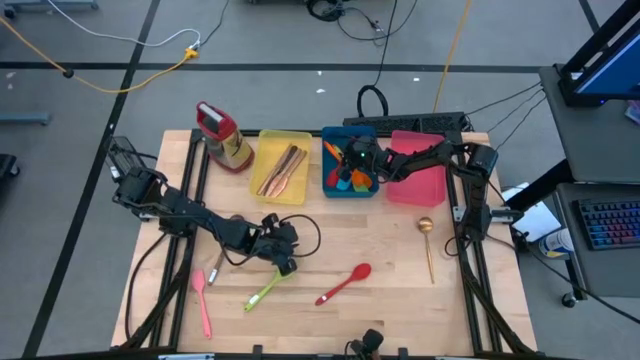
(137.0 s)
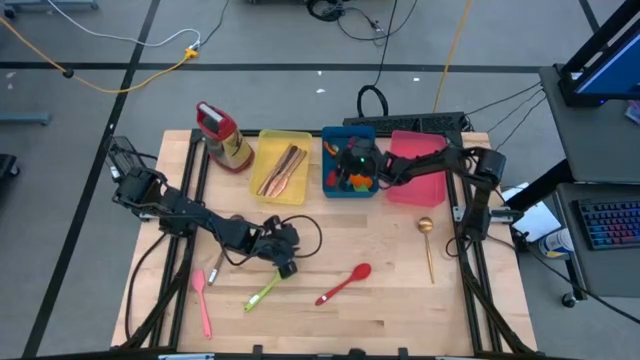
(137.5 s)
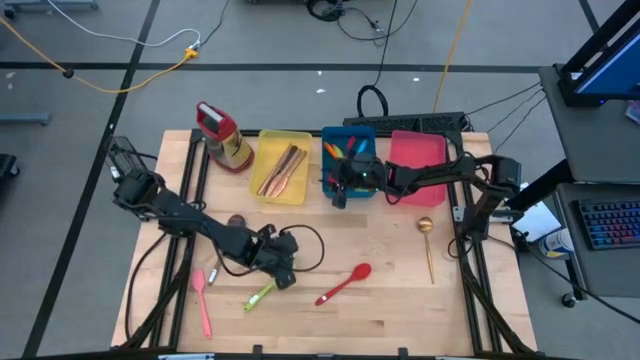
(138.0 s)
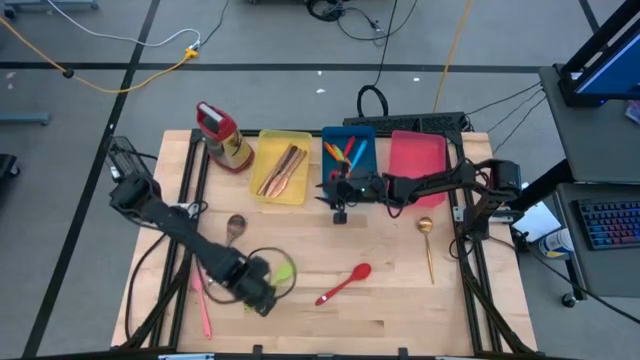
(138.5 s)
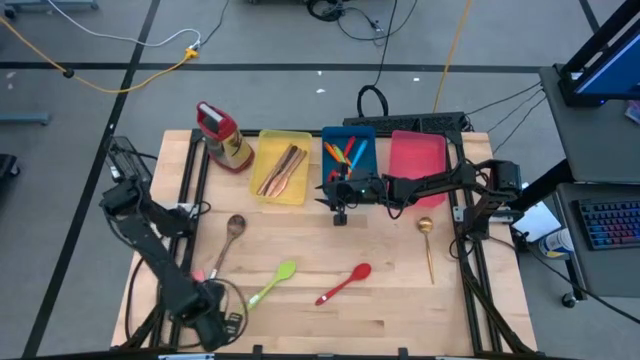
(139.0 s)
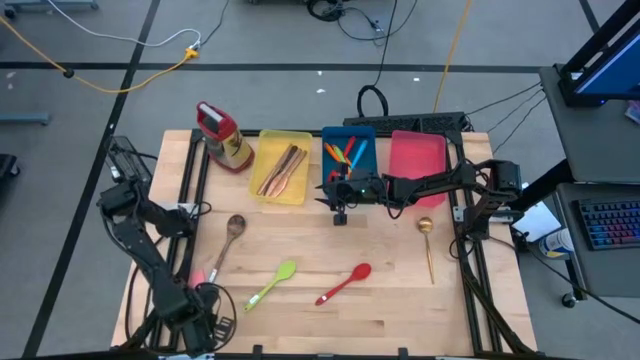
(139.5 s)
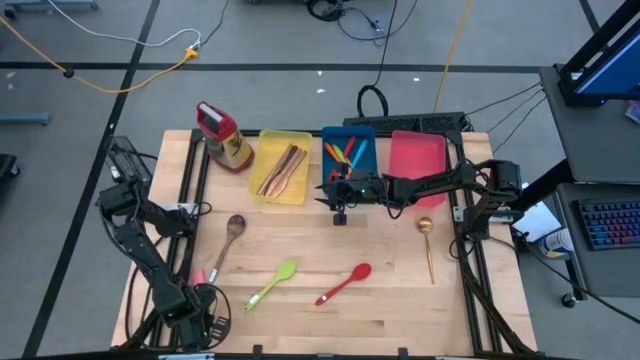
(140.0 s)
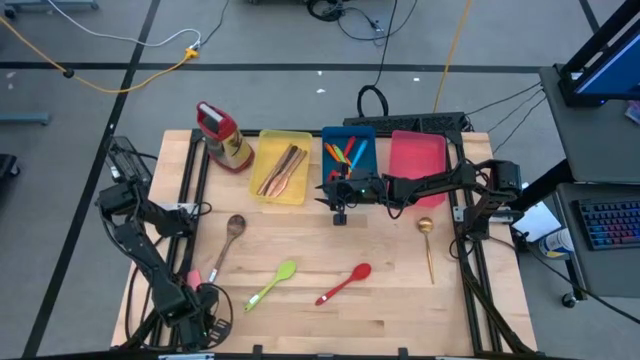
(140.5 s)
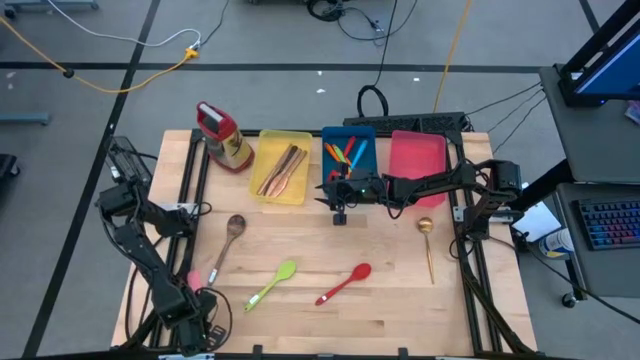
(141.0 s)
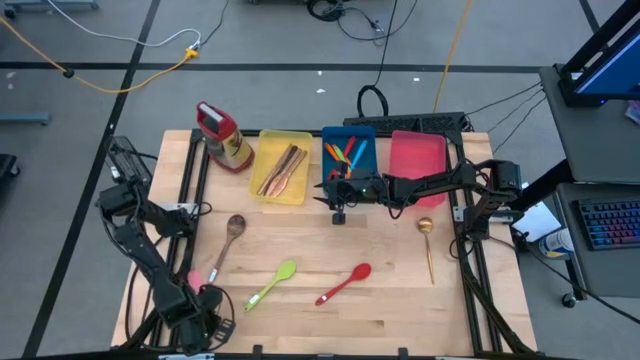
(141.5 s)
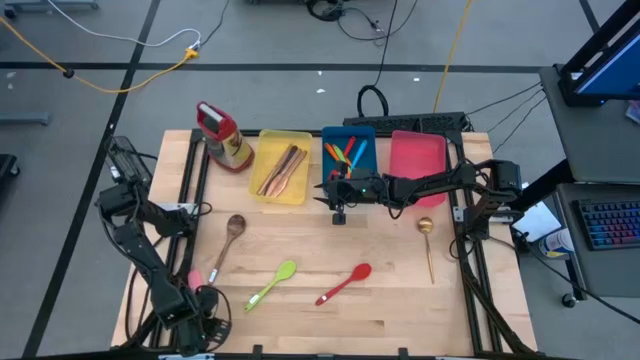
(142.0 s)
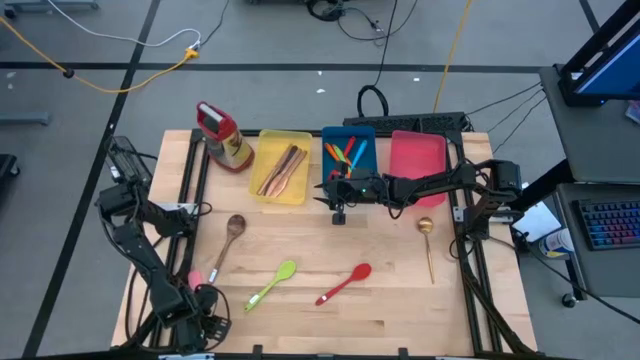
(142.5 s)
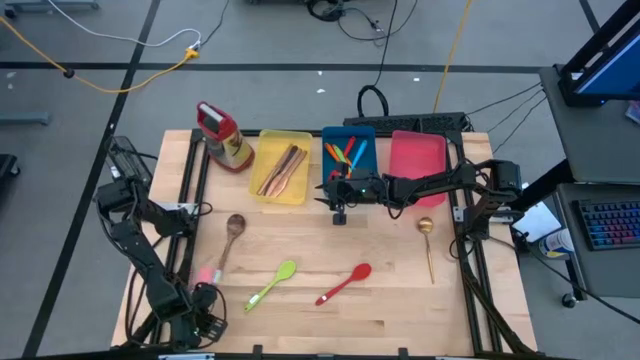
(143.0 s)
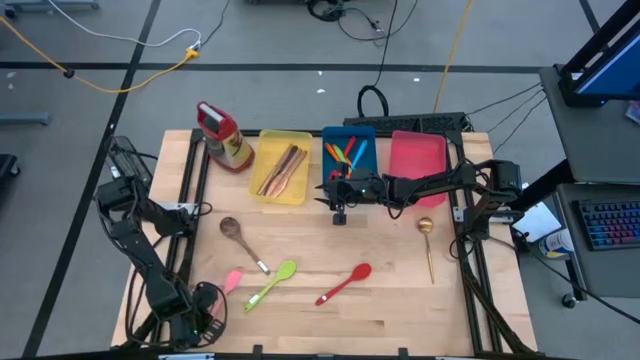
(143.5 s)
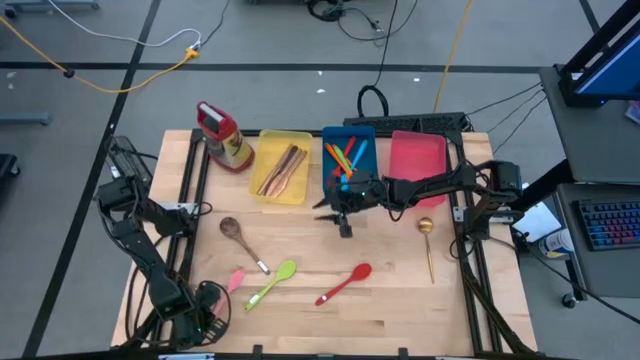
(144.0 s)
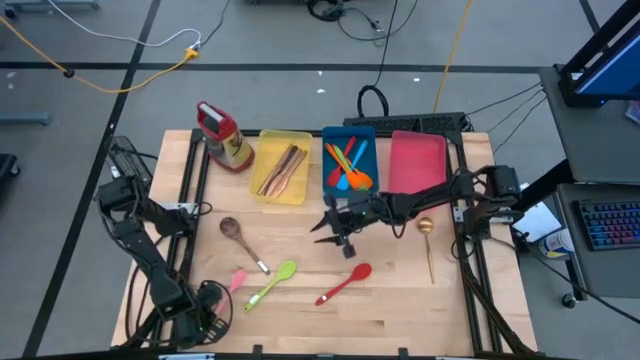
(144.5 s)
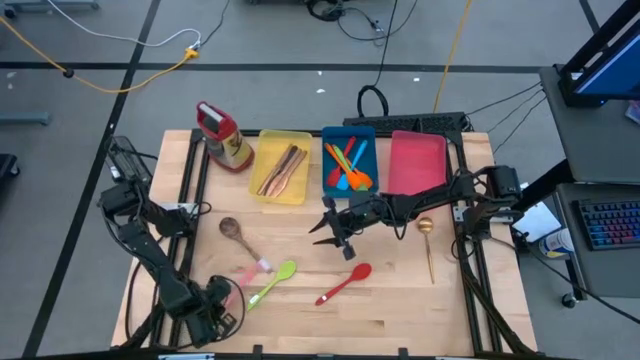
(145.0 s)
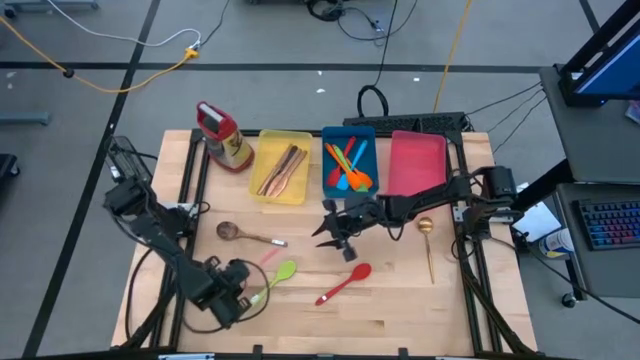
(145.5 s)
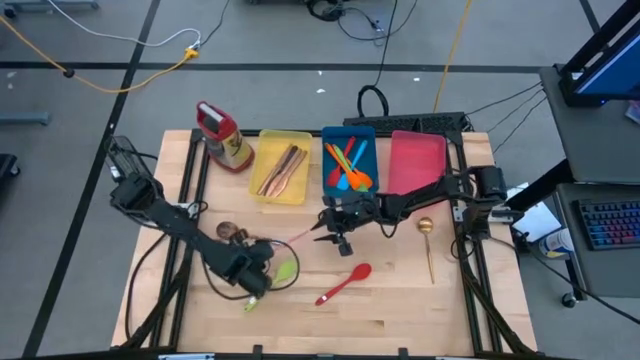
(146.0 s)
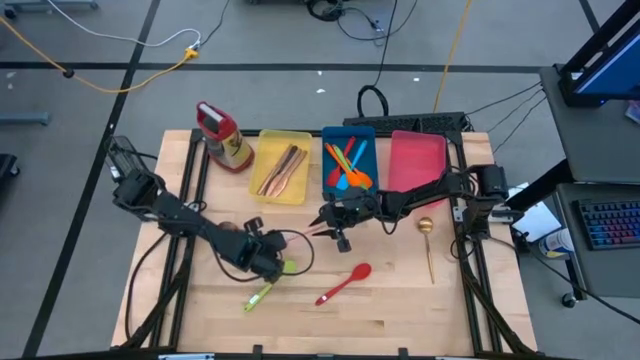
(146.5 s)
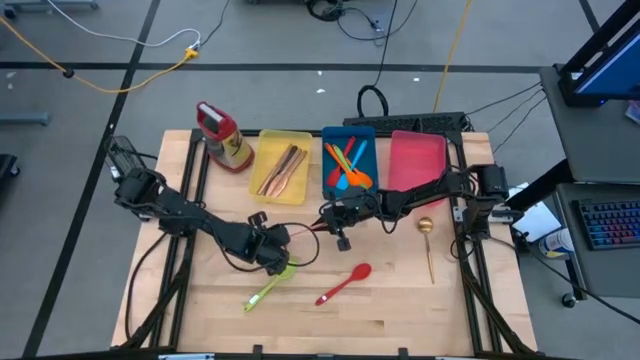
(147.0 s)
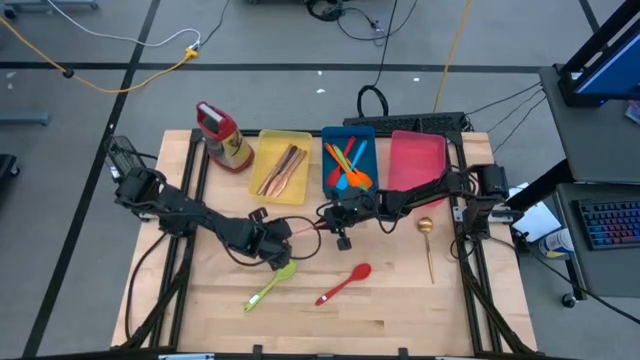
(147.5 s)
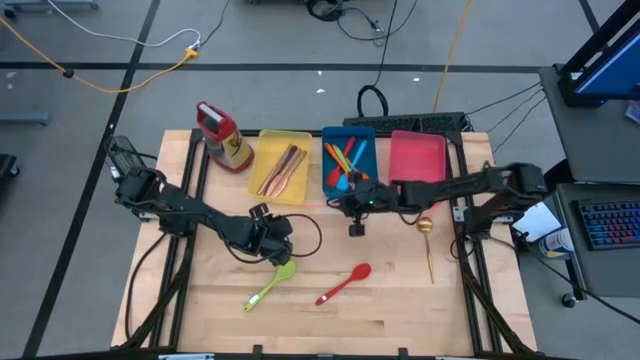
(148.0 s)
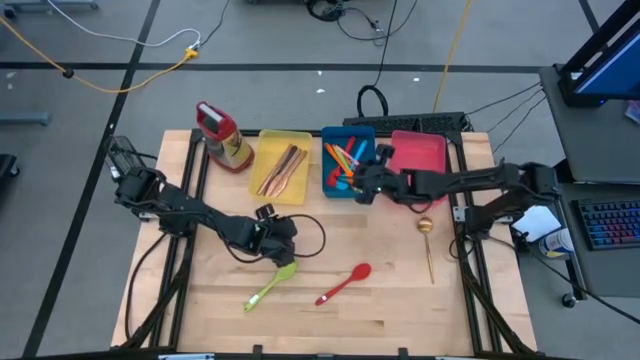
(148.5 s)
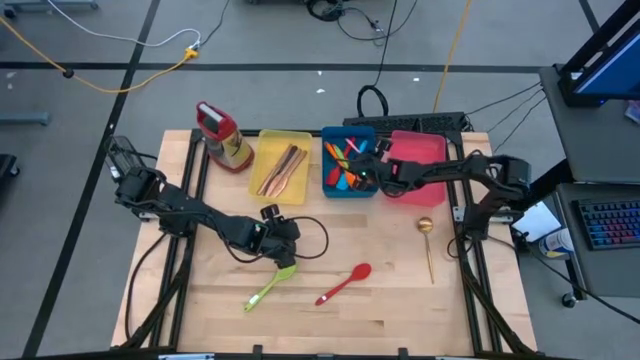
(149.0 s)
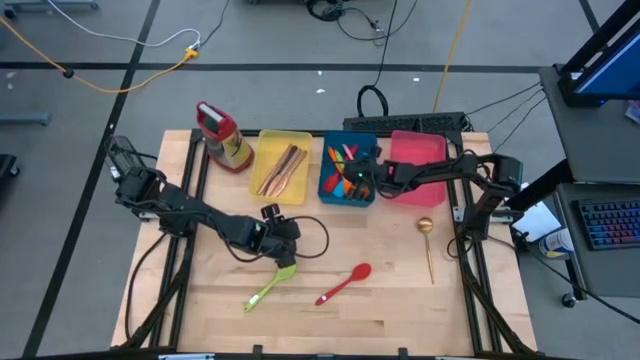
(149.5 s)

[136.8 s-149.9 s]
Task: Pick & Place Kitchen Items
Put the pink spatula into the blue bin

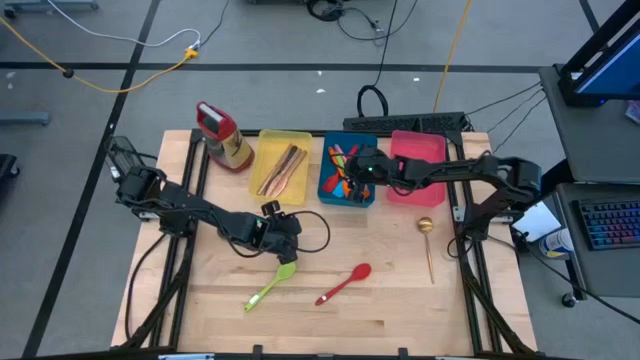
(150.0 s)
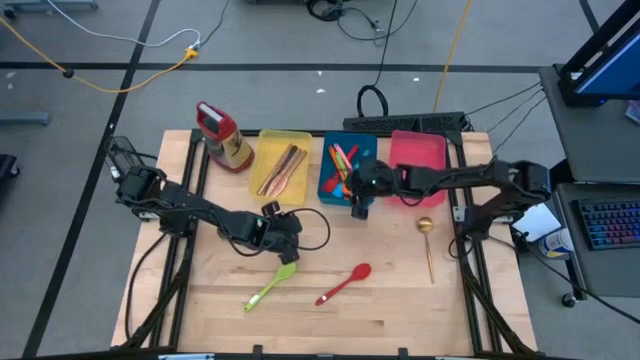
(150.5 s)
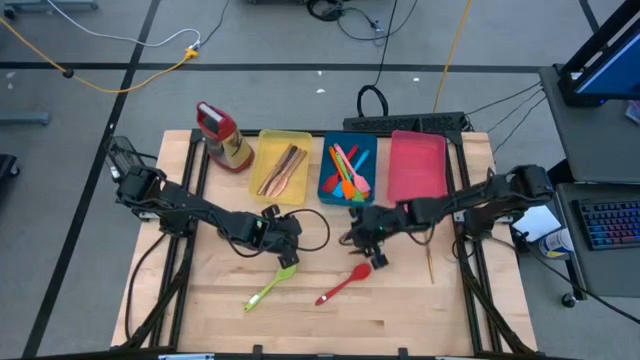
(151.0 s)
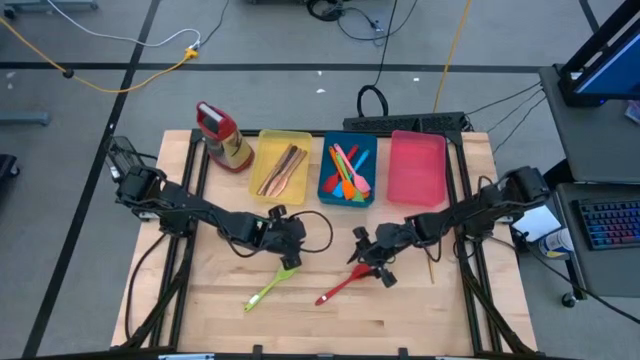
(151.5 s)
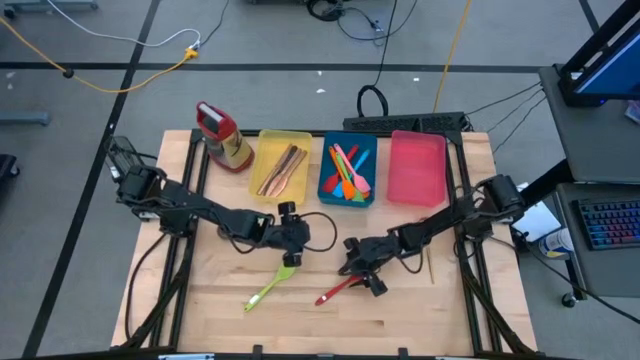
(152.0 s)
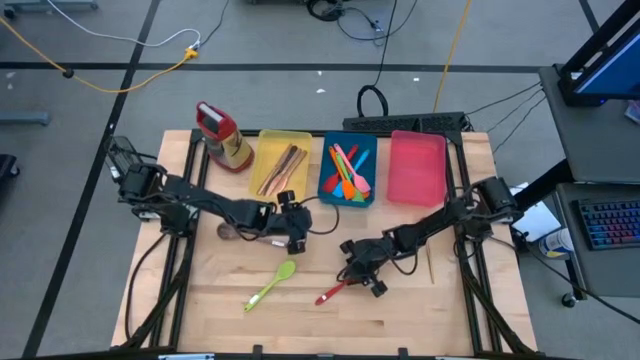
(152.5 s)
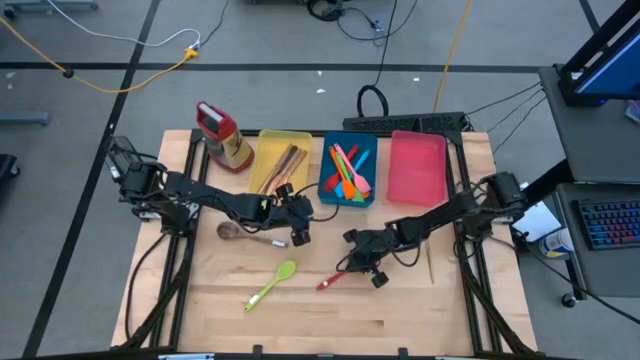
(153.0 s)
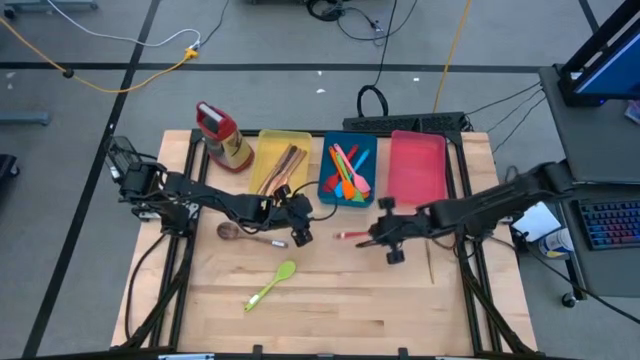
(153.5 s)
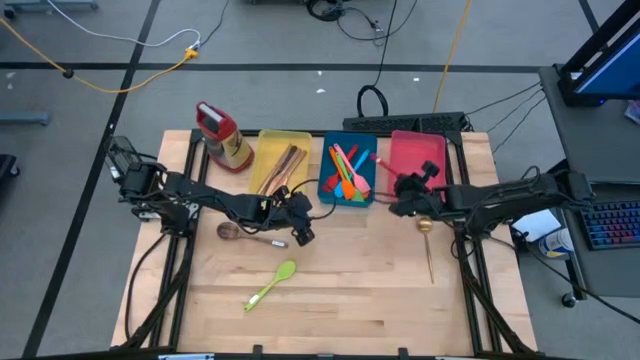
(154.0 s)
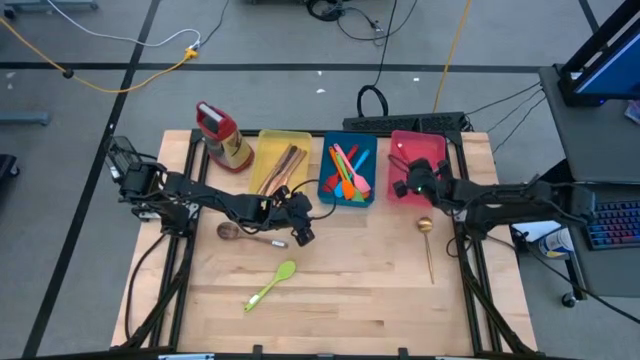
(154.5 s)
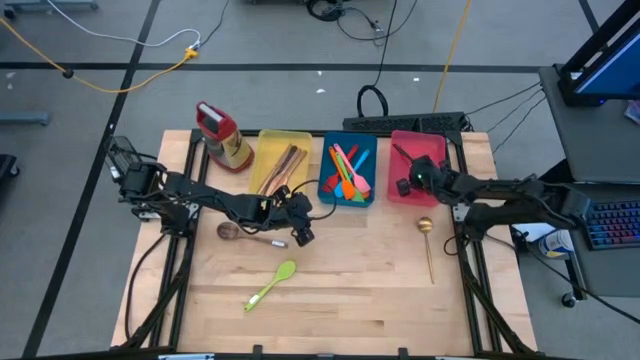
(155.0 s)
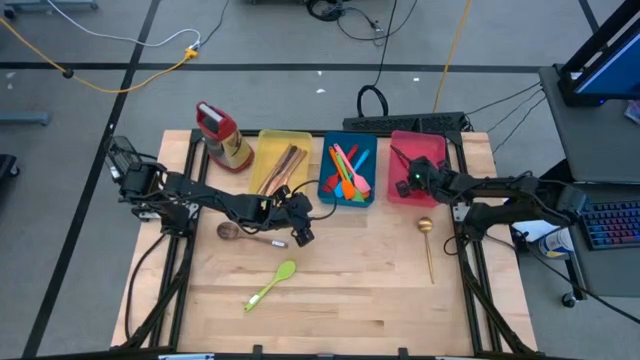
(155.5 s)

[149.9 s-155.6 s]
Put the red serving spoon into the pink bin

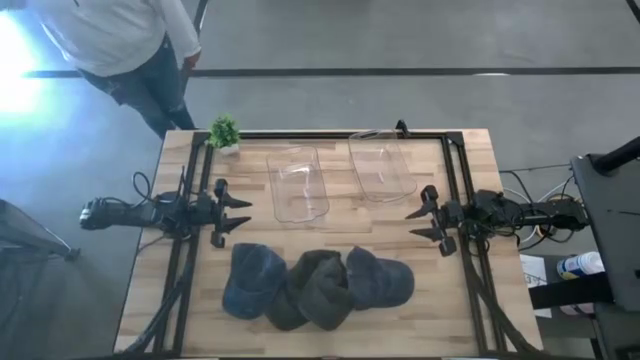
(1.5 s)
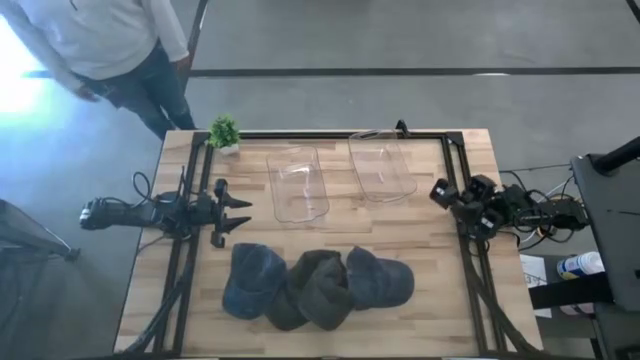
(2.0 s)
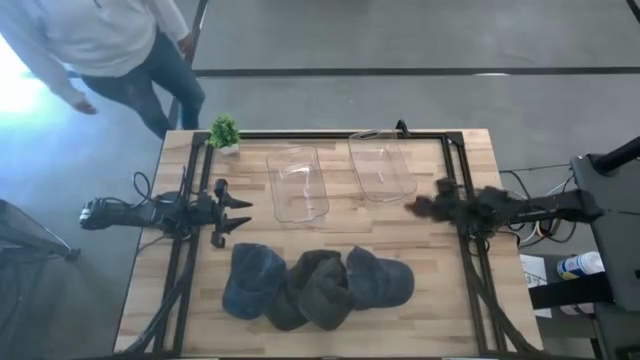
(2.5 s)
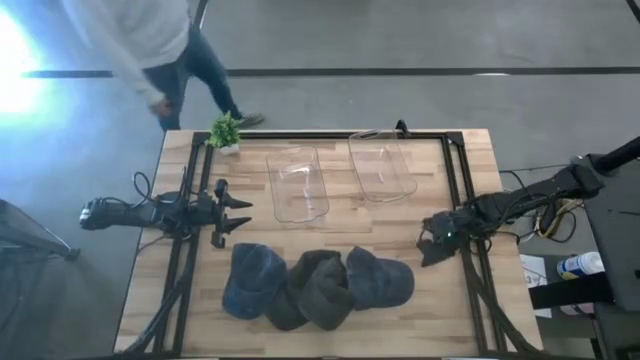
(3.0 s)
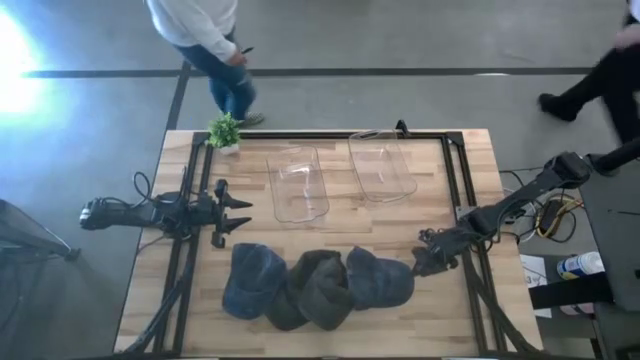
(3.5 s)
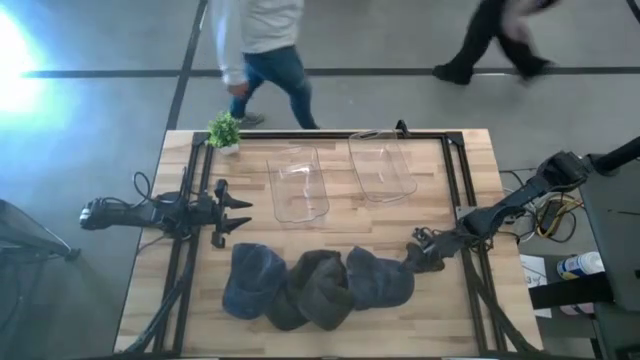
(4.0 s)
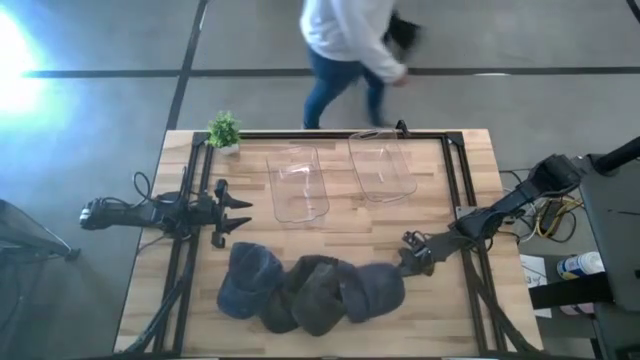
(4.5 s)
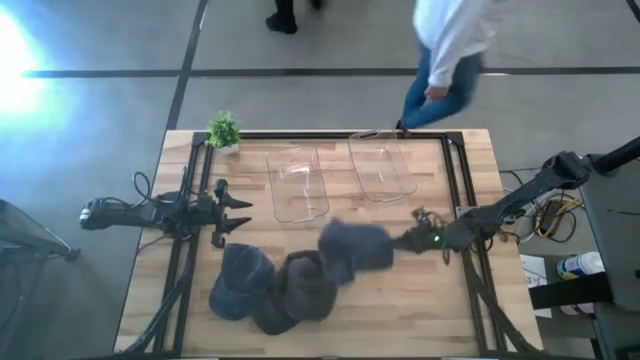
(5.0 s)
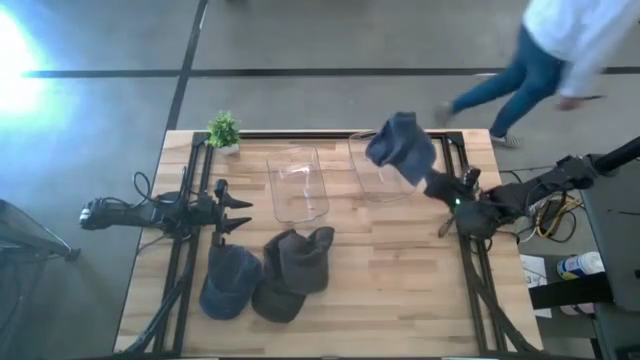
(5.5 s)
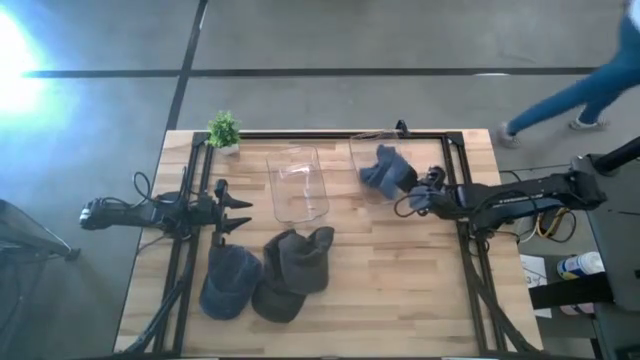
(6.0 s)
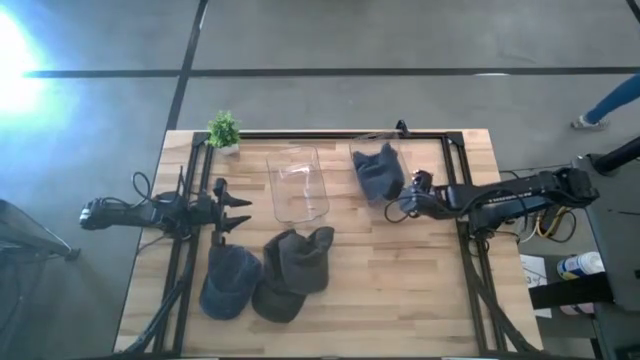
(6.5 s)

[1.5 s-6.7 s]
Task: Pick & Place hat
Put the right blue cap into the right transparent bin
